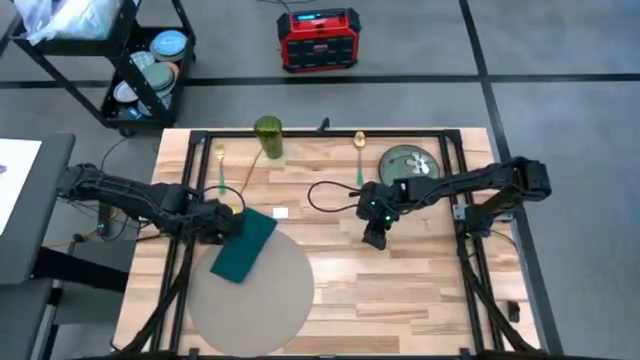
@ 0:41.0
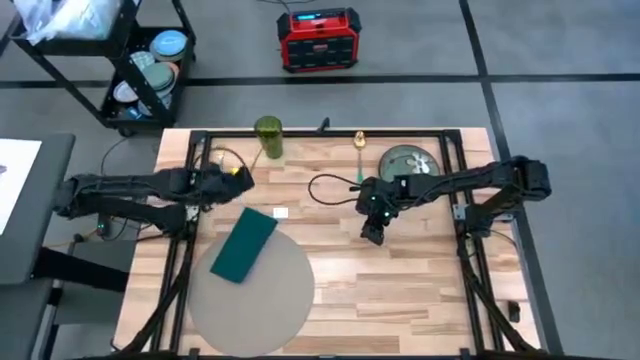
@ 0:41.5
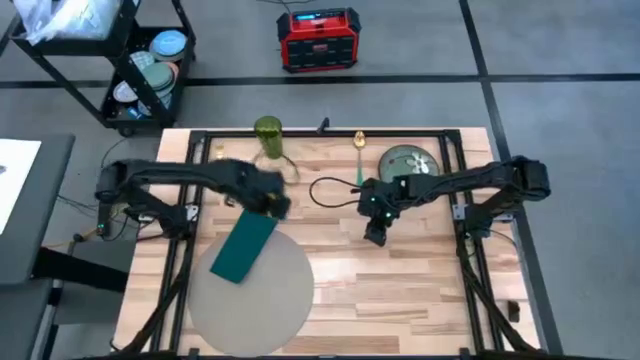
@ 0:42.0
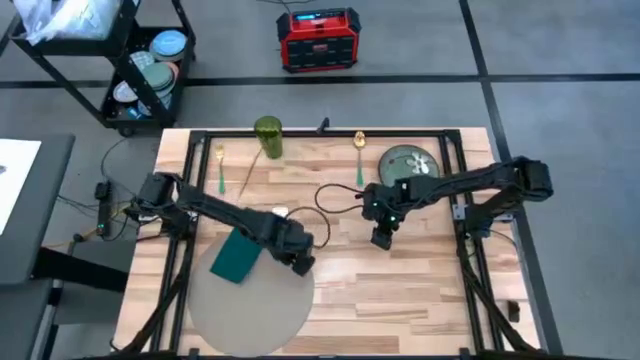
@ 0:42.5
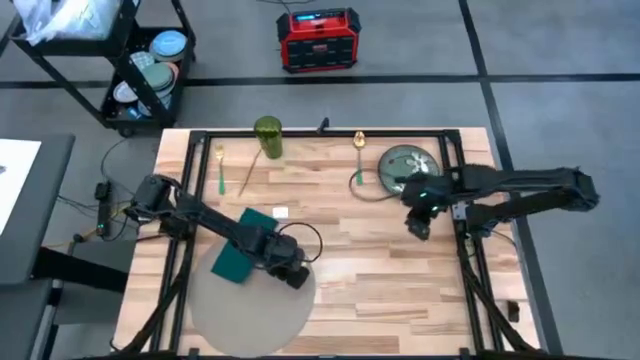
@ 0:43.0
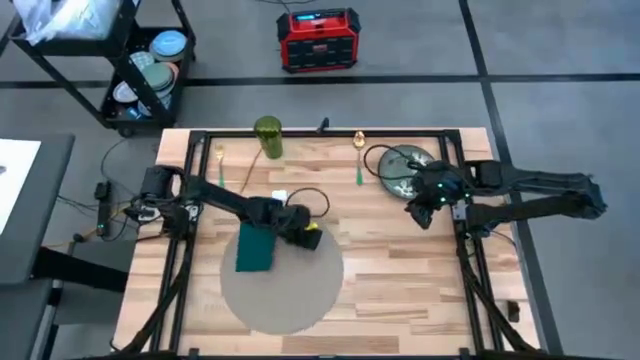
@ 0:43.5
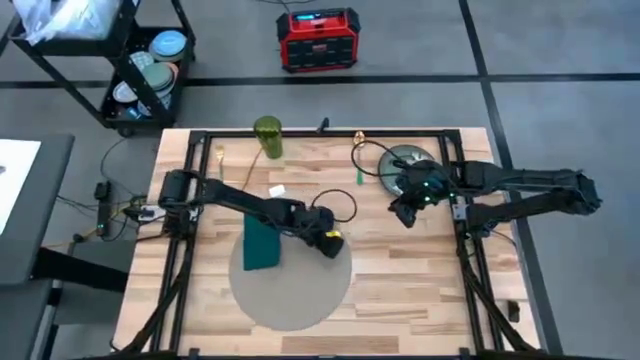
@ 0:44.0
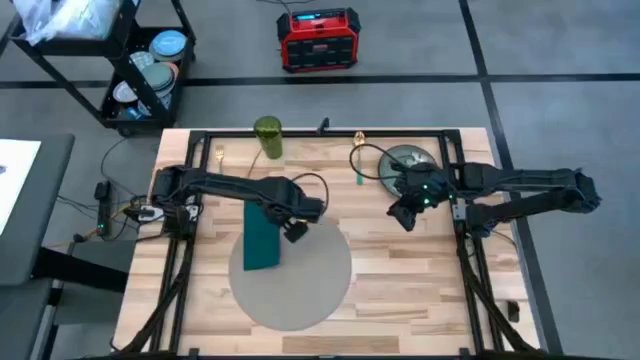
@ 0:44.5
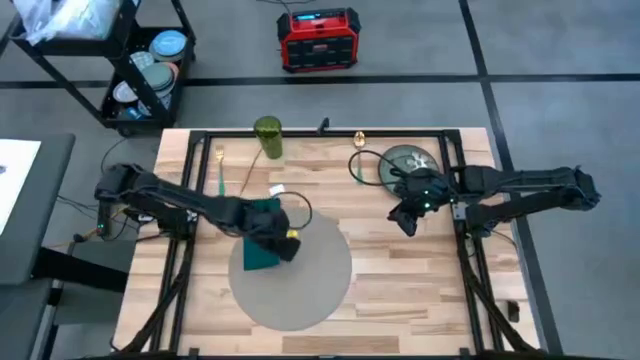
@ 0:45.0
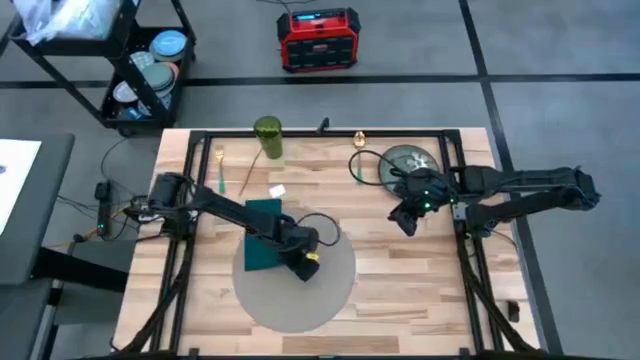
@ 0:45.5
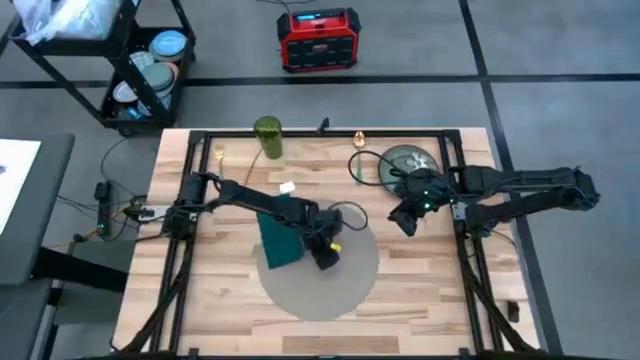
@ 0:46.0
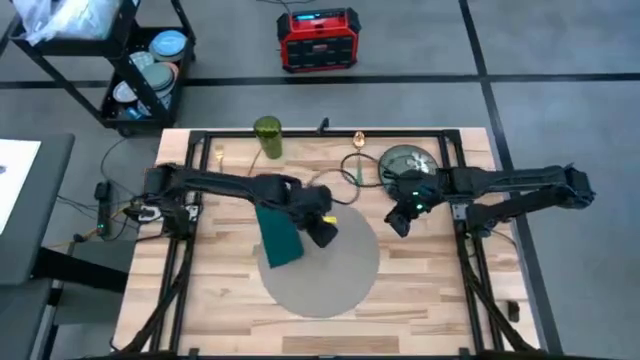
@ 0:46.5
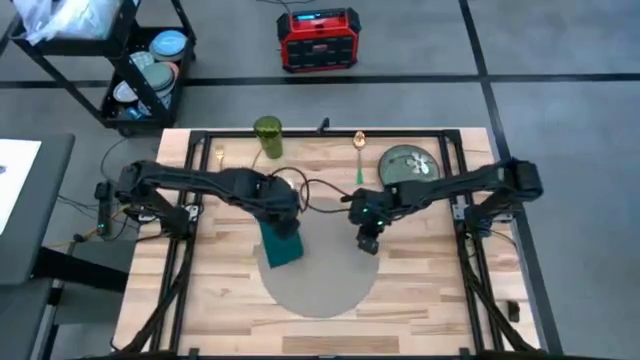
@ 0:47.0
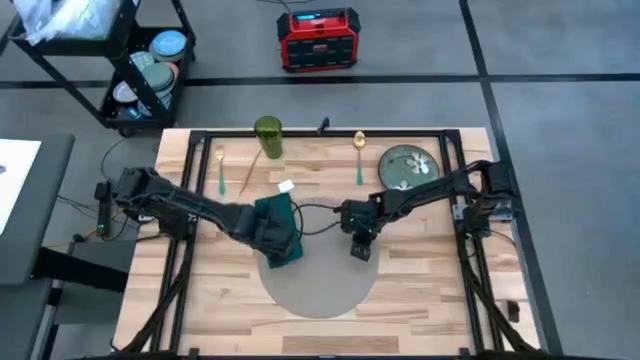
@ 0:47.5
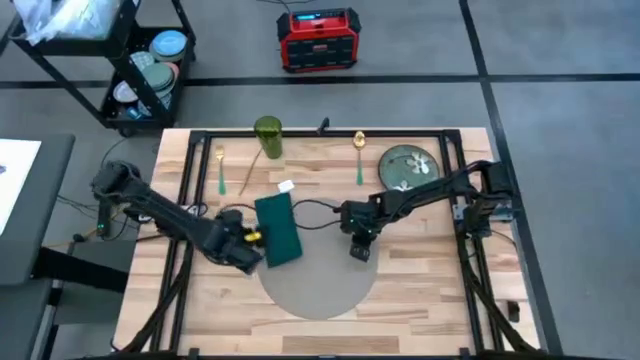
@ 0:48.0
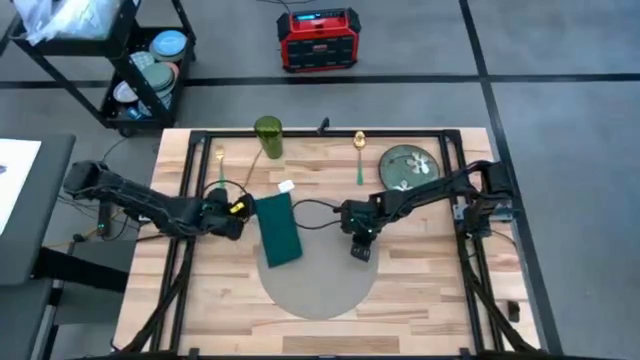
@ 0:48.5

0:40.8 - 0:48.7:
Task: Set table place
Move the gray mat to the center

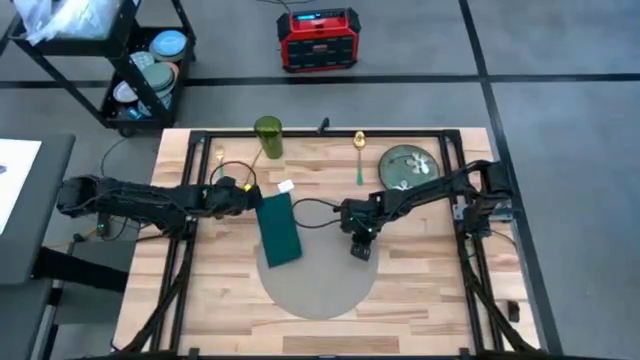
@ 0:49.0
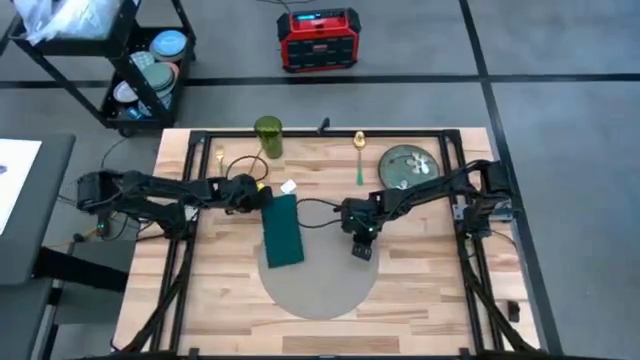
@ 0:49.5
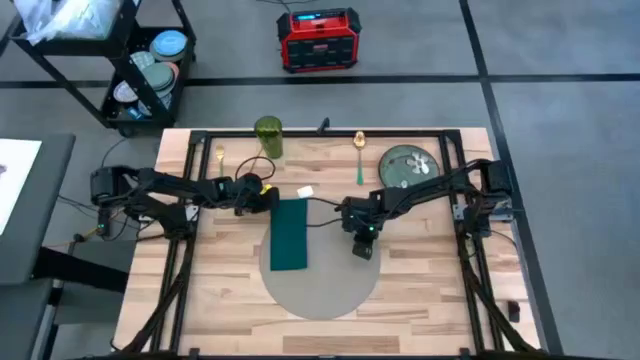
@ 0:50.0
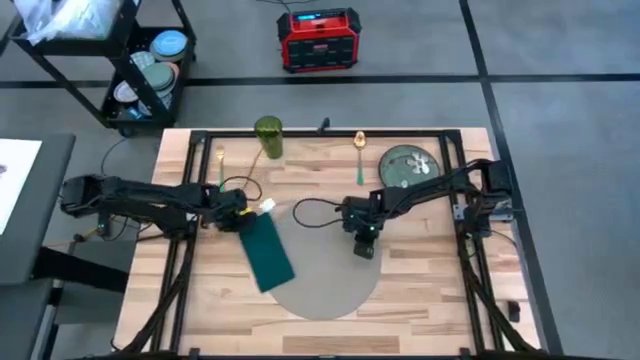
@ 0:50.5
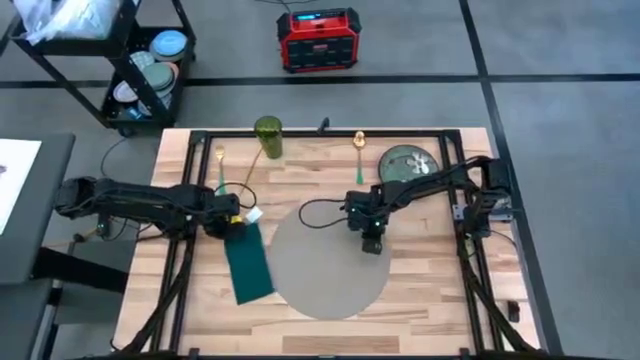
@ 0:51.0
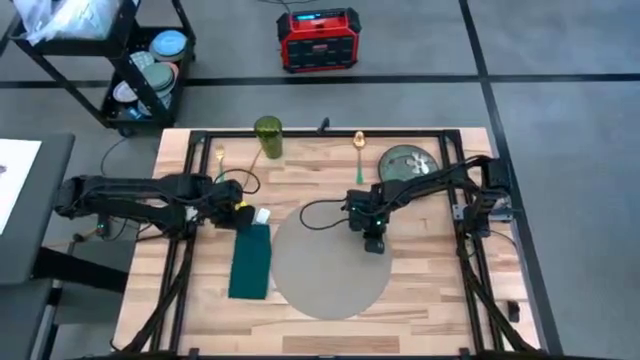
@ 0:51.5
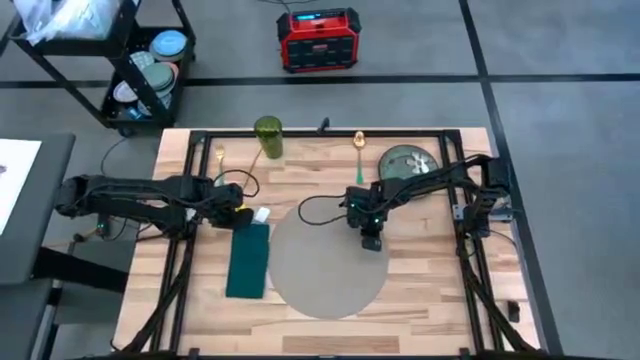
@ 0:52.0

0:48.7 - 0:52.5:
Put the green napkin beside the gray mat

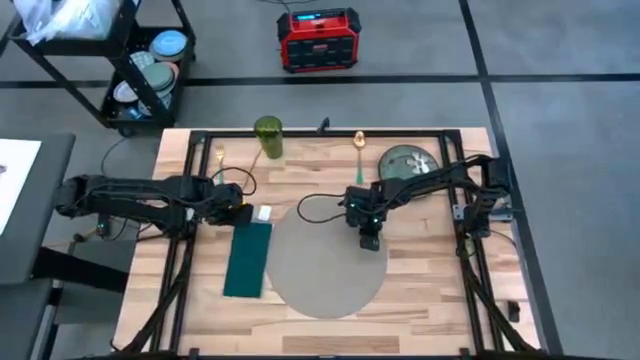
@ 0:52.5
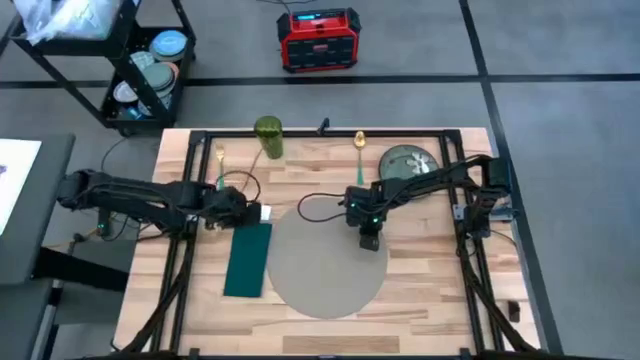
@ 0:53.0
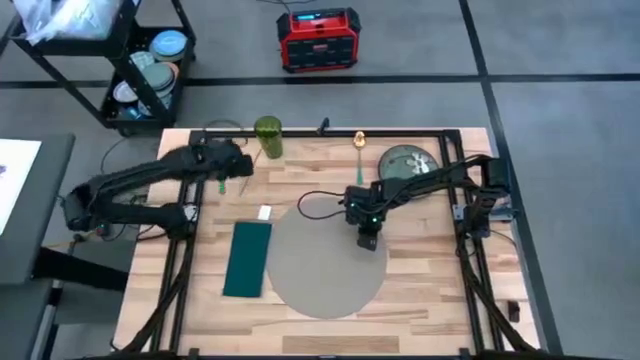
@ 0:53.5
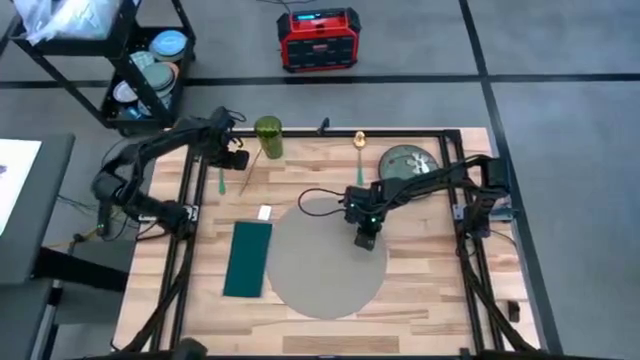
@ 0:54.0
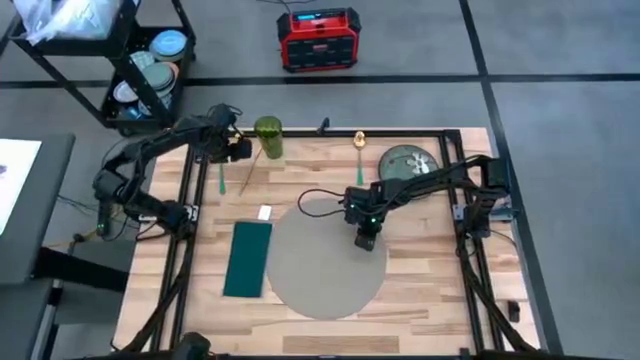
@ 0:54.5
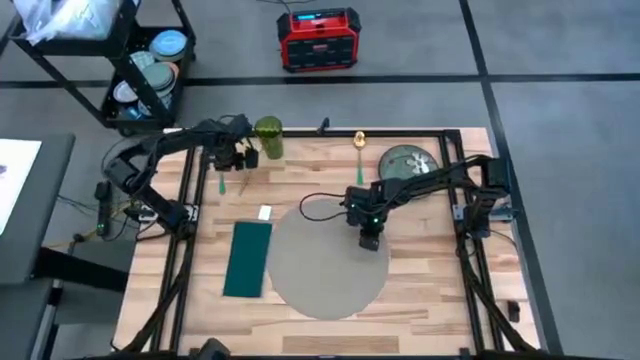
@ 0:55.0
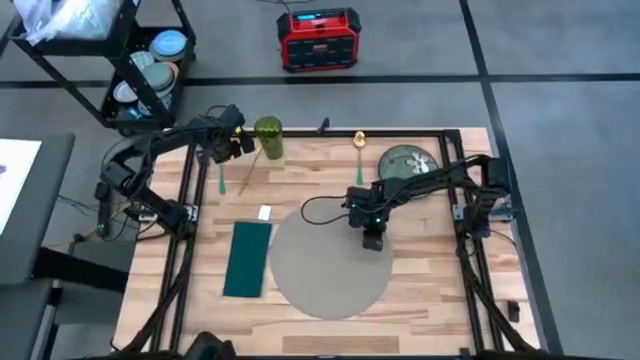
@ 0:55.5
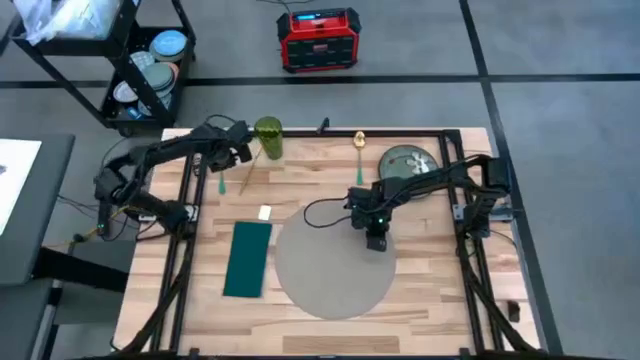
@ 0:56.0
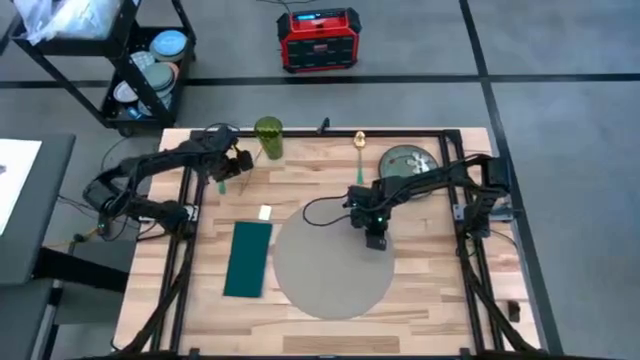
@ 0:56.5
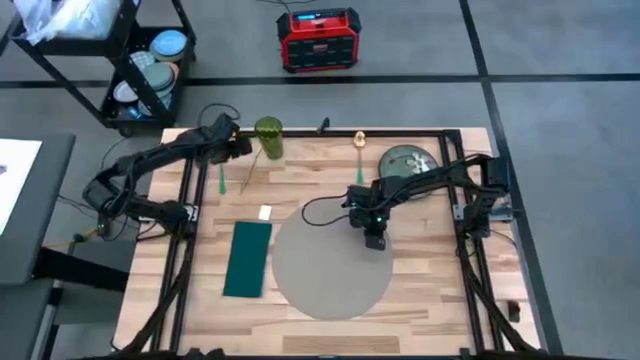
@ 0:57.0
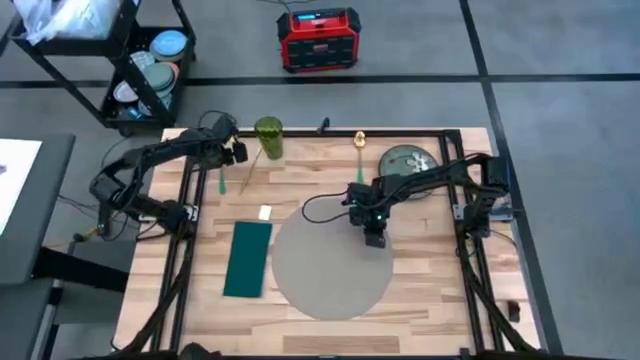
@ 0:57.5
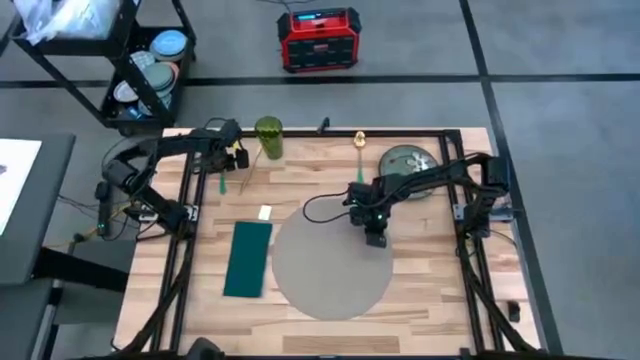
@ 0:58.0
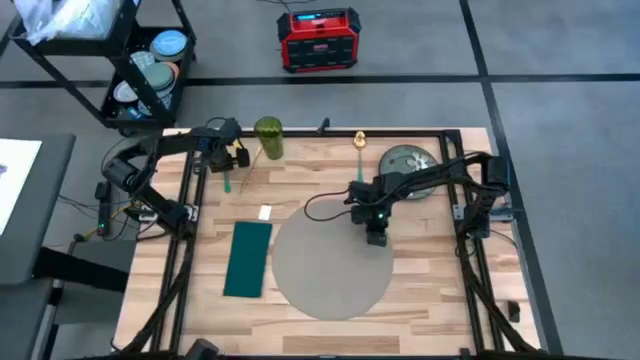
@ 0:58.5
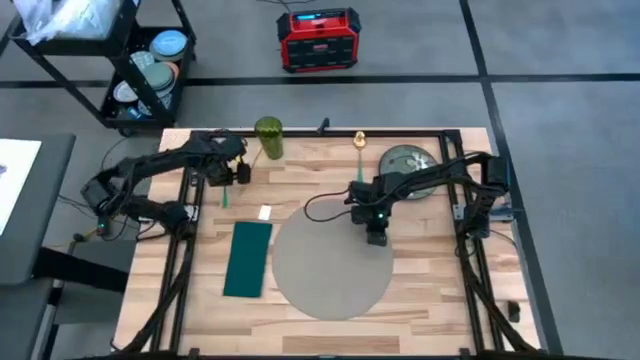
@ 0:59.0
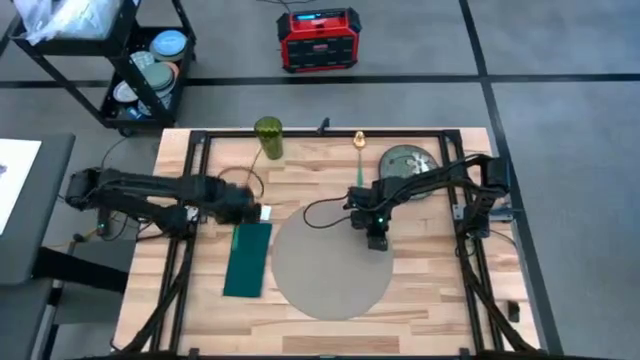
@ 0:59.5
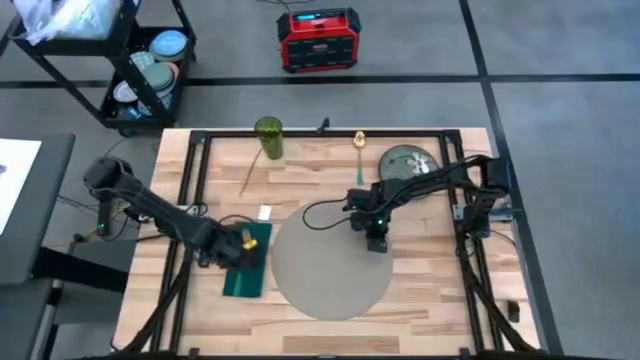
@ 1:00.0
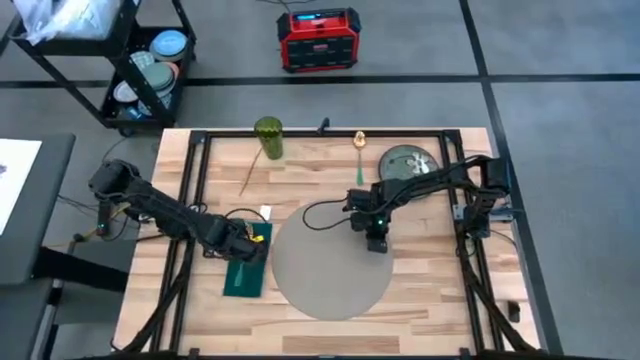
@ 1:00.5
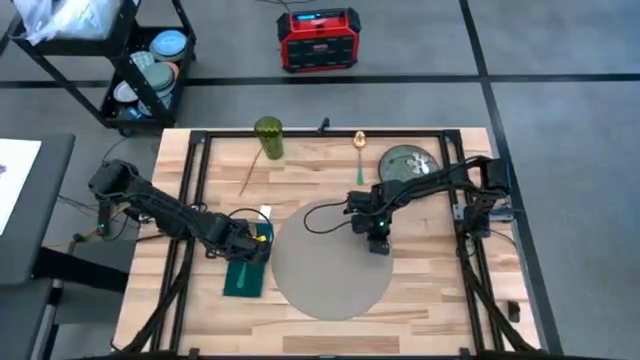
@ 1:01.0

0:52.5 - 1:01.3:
Put the fork on the green napkin
